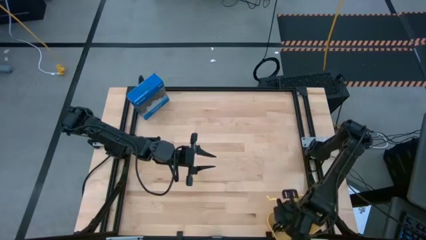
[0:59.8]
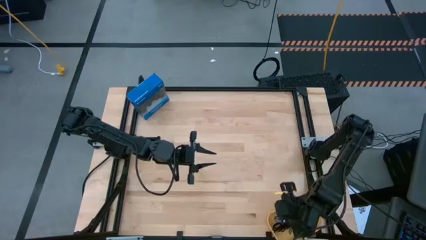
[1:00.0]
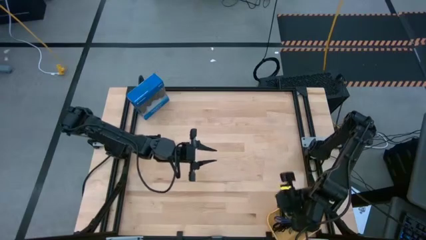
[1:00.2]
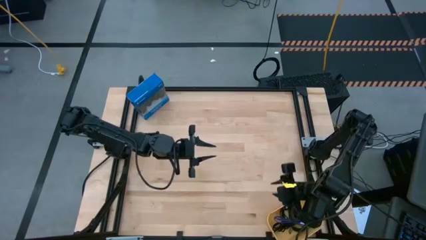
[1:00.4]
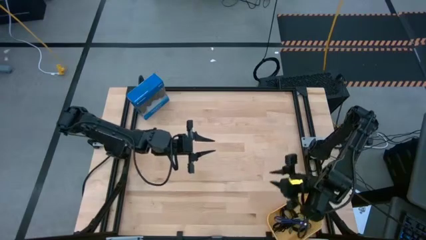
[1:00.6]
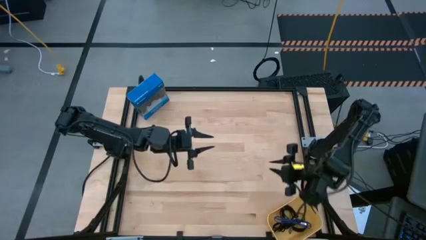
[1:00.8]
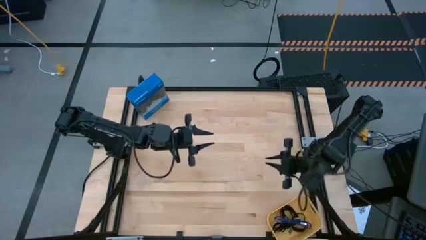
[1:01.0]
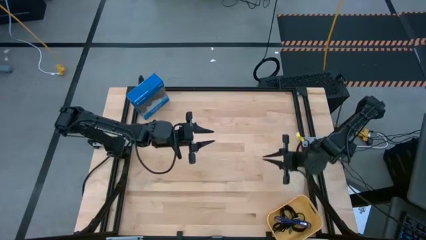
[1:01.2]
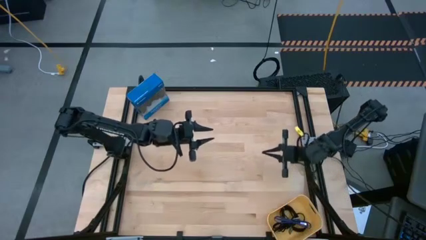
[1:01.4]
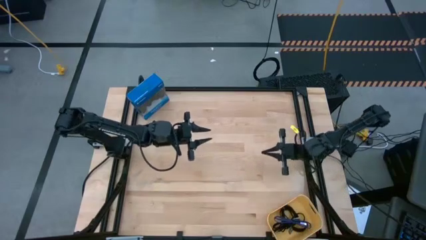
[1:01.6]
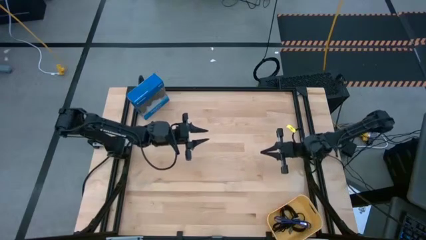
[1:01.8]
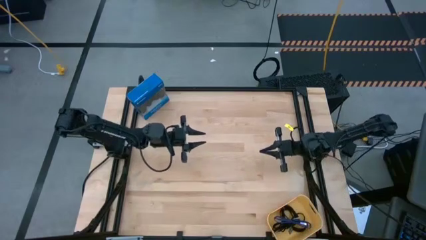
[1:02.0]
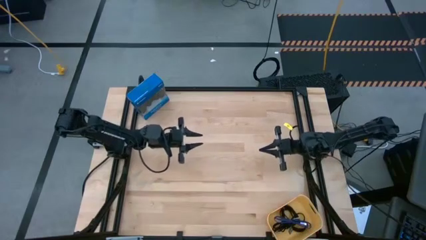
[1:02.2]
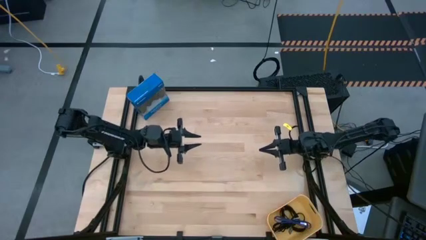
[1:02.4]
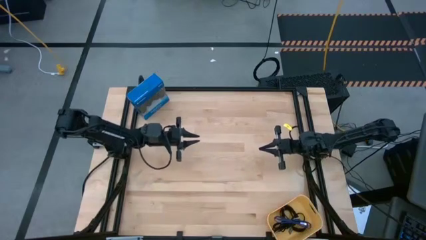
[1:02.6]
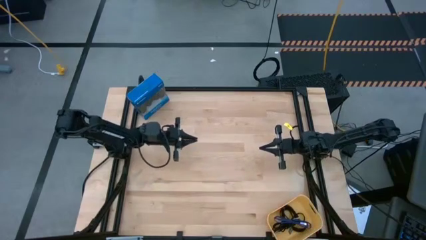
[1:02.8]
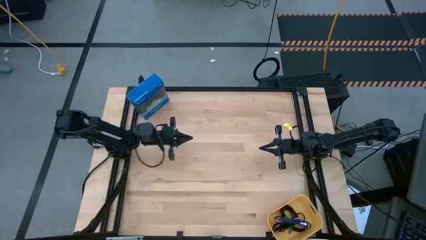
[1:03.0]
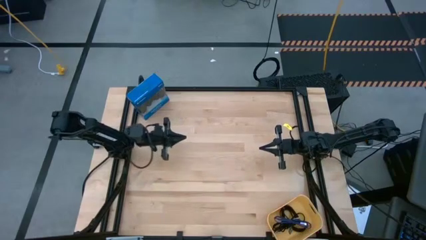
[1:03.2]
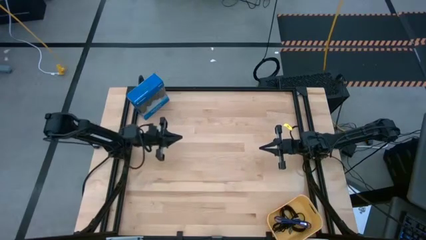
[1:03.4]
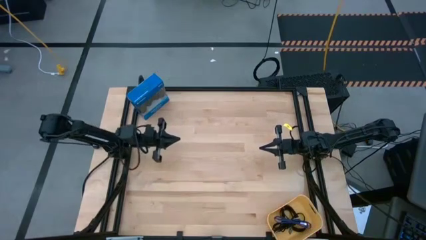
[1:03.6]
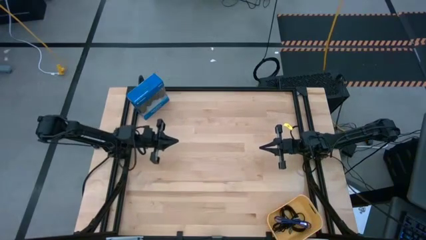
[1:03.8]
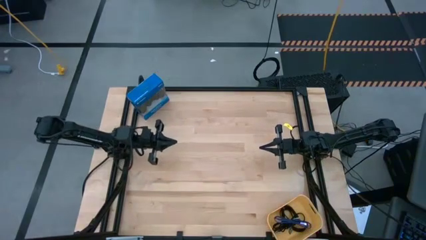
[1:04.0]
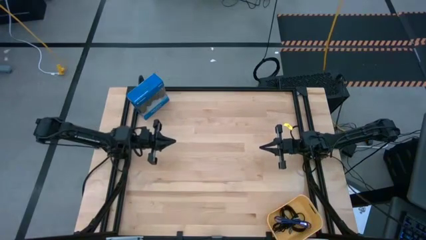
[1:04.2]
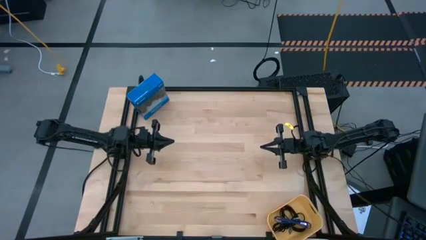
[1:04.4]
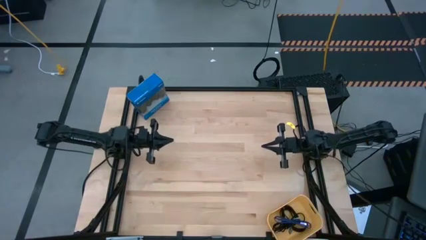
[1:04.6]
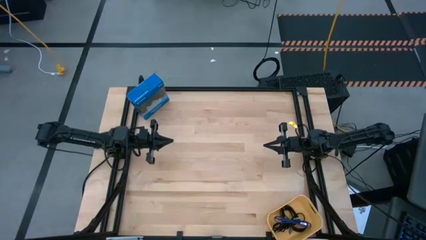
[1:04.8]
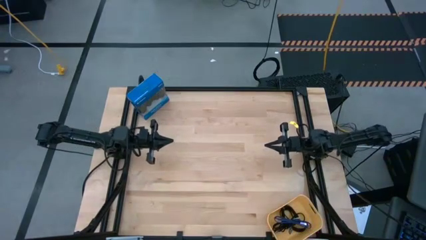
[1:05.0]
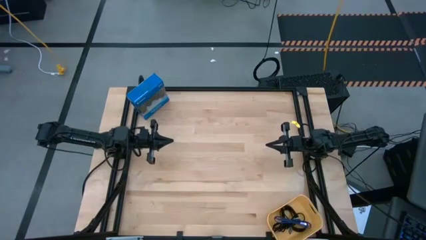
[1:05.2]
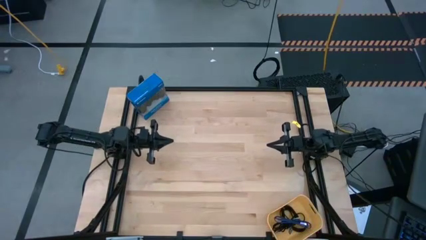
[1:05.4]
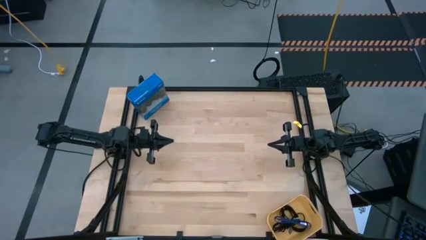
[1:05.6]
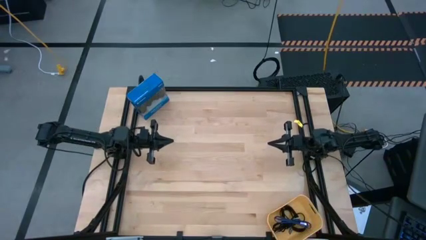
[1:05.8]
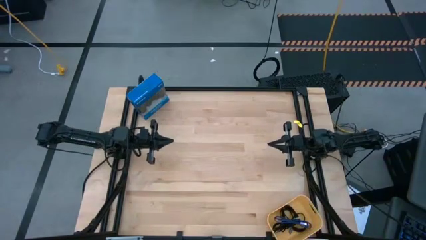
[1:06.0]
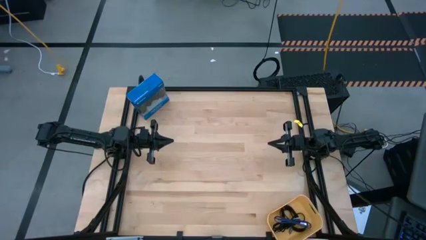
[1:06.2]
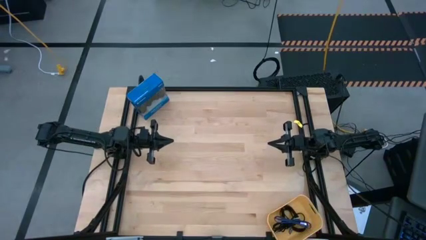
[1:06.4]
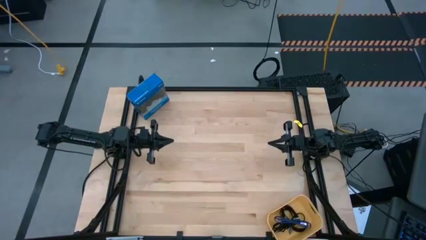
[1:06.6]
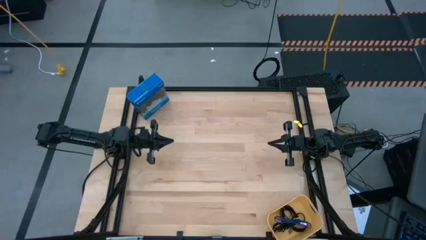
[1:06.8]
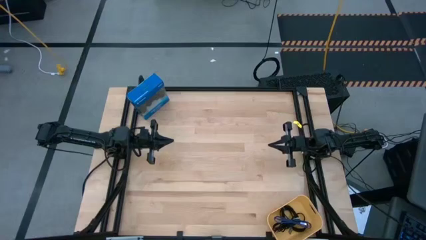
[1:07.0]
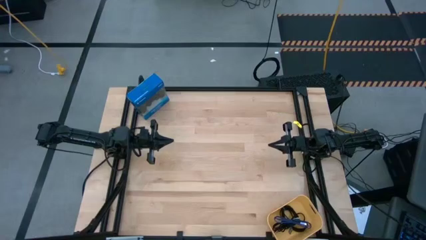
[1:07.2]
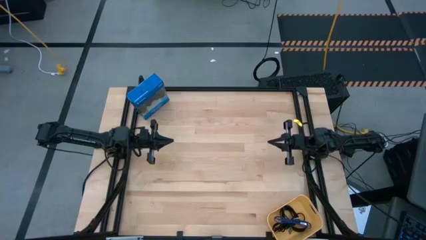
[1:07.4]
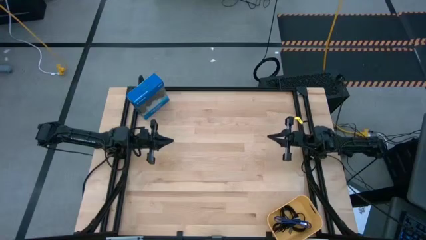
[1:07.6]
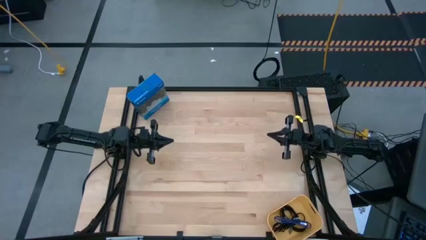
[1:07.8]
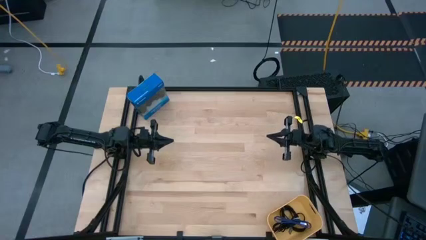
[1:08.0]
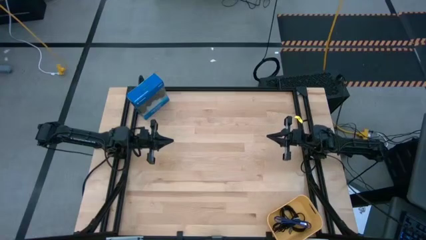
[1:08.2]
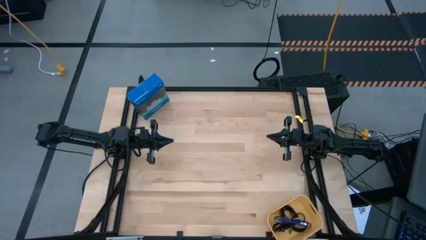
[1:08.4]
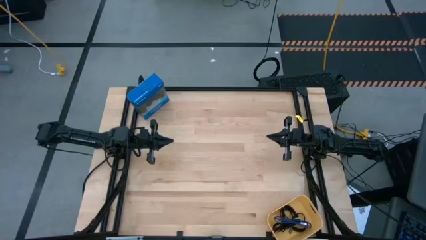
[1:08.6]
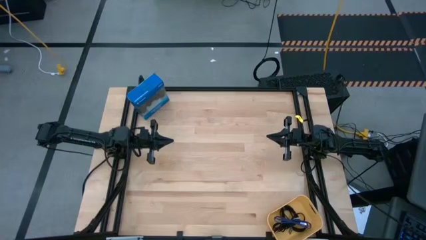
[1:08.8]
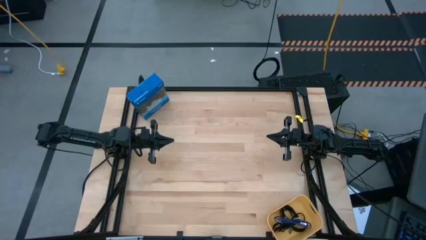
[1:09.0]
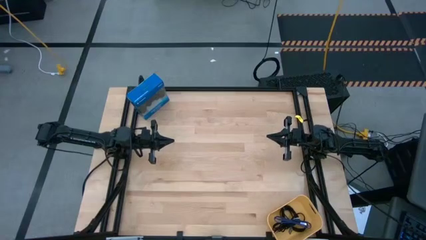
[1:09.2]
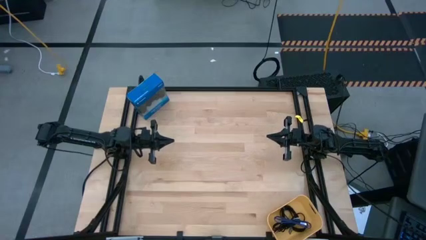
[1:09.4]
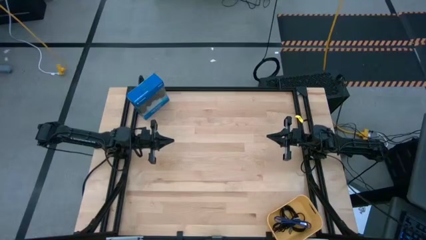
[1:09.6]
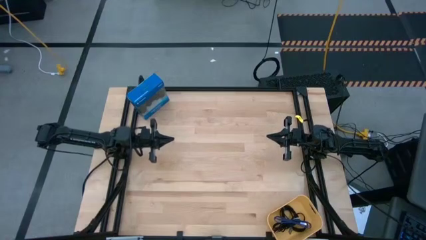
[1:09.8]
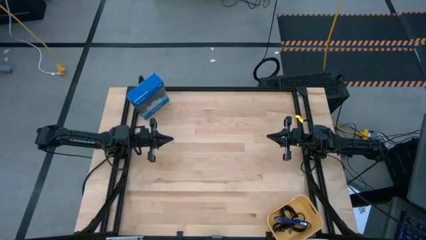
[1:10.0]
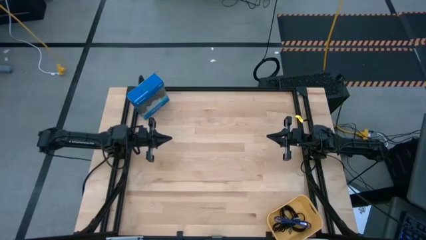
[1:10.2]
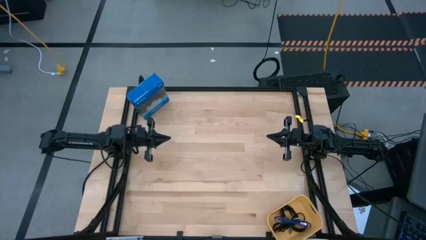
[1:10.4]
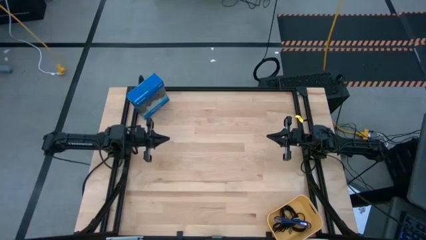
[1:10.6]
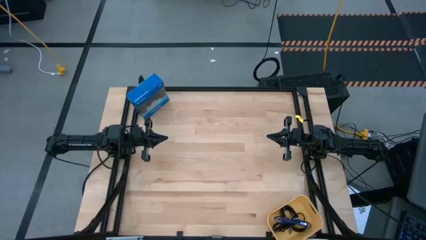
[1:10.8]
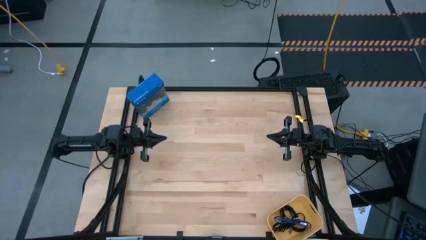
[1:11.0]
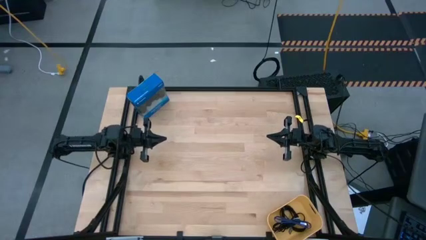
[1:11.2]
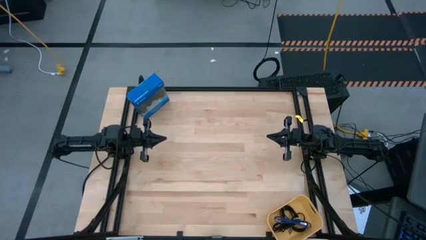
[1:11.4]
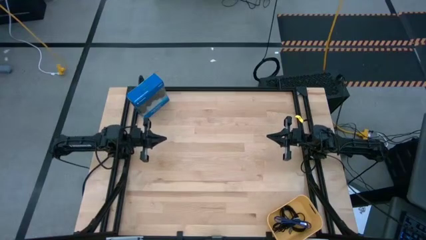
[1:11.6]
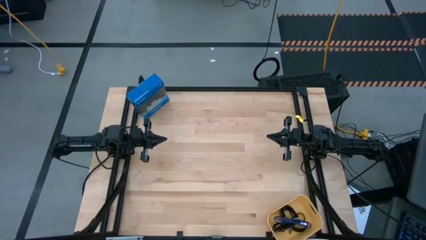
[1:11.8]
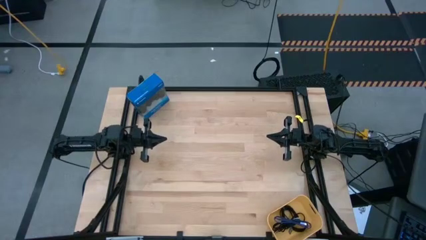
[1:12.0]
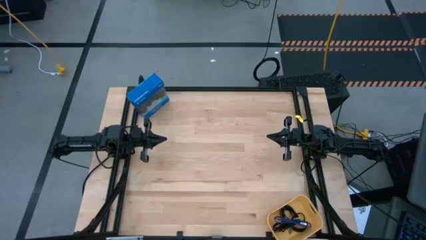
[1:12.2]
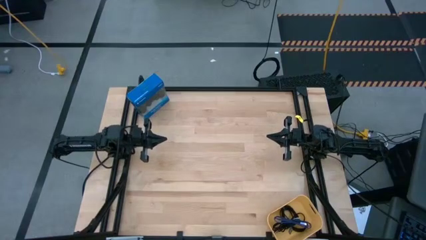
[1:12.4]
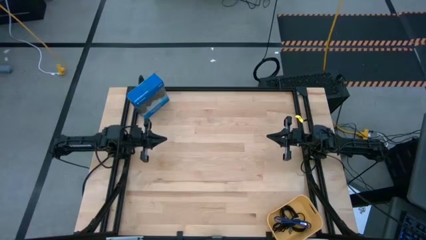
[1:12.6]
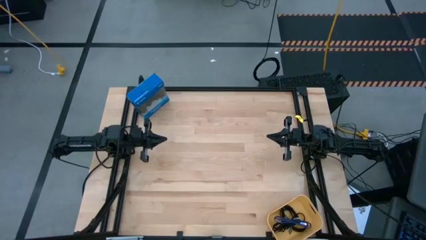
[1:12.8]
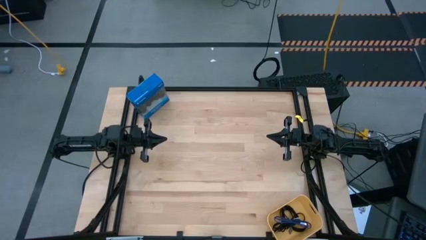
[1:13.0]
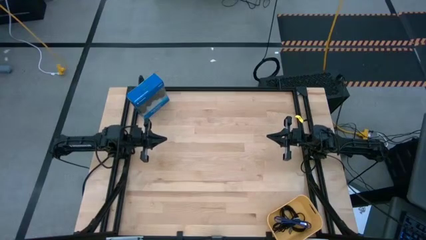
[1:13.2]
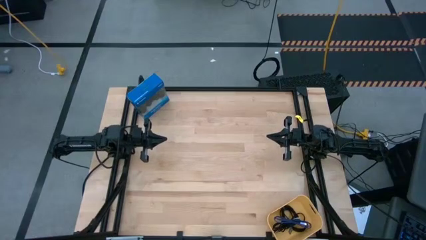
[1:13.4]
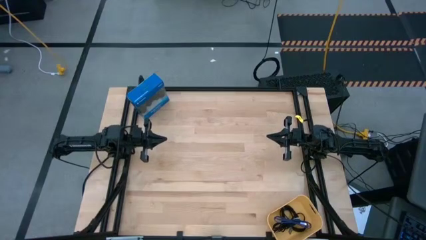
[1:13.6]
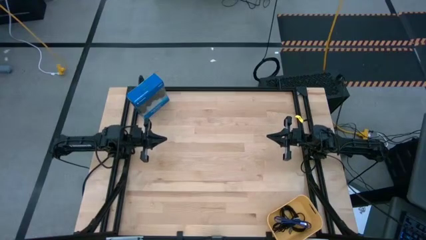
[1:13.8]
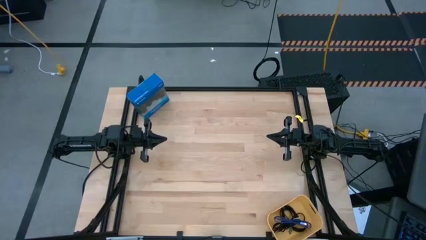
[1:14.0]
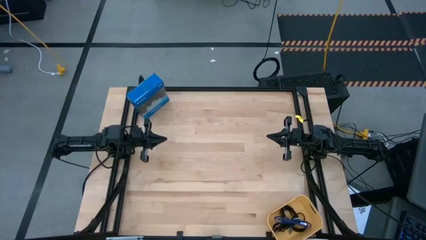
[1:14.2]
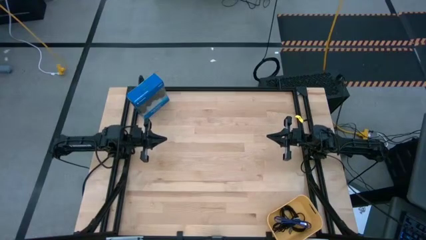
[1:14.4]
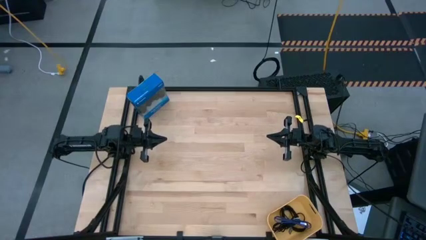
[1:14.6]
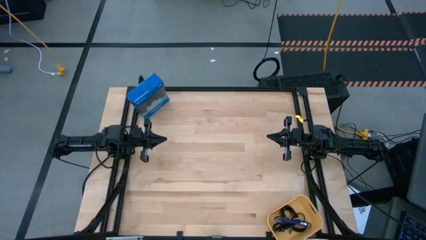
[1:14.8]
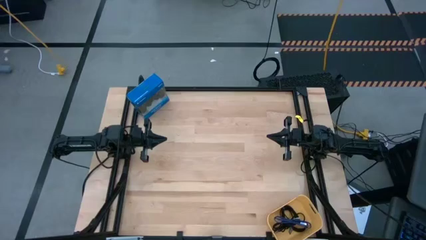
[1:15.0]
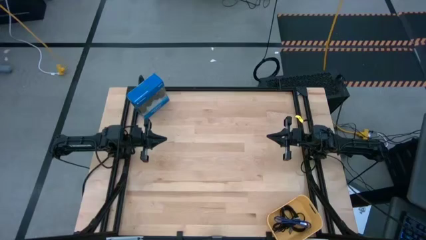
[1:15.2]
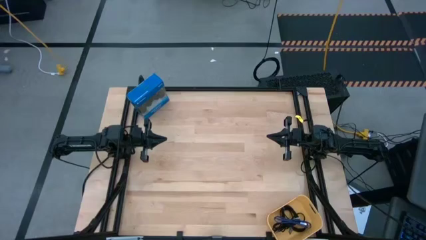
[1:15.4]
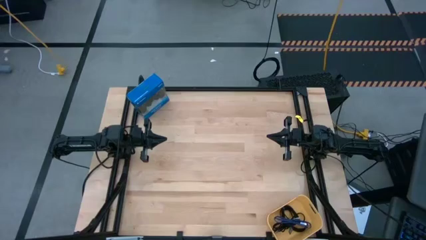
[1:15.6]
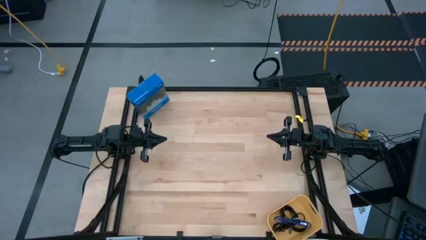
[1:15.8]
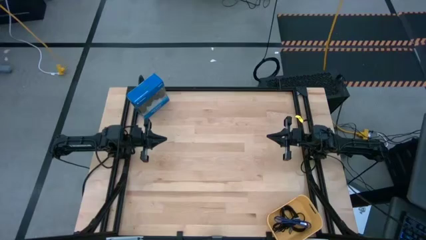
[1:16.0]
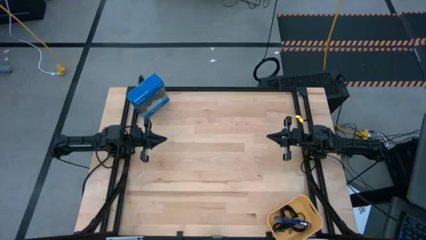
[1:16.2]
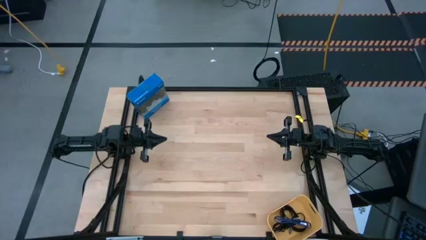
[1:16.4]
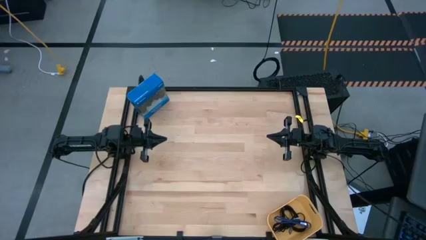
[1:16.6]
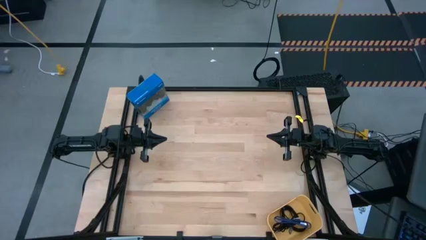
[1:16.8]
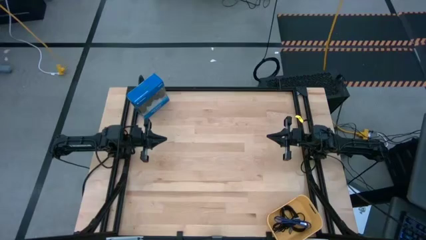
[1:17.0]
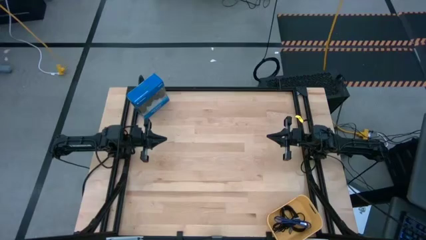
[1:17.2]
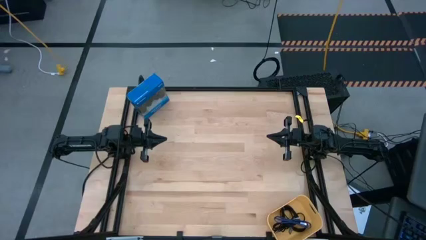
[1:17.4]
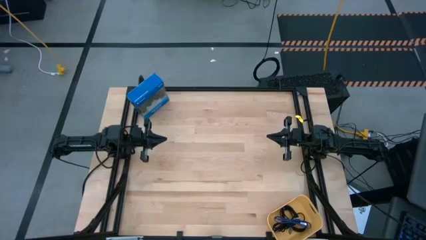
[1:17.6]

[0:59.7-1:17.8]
Task: Pick and place USB-C Cables
Return to Home Position
